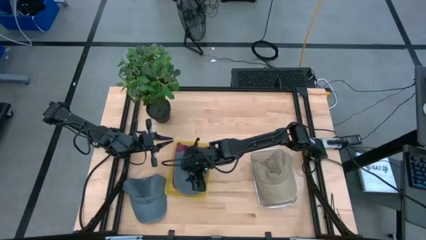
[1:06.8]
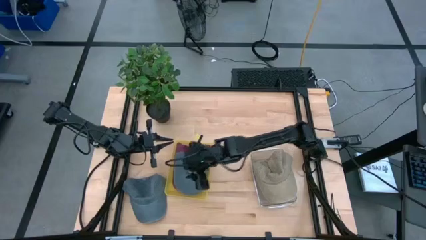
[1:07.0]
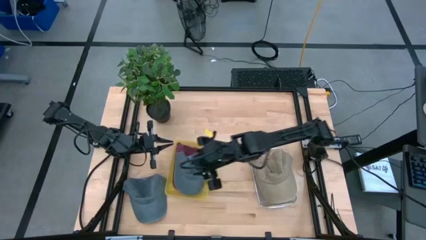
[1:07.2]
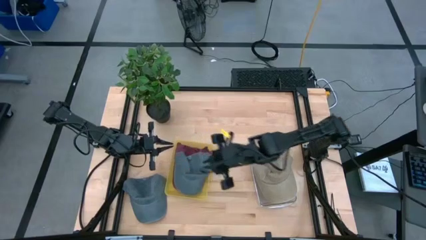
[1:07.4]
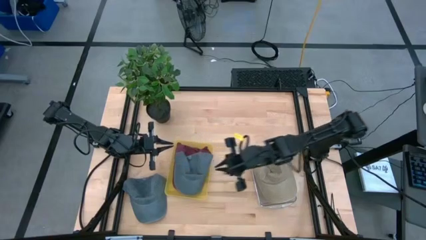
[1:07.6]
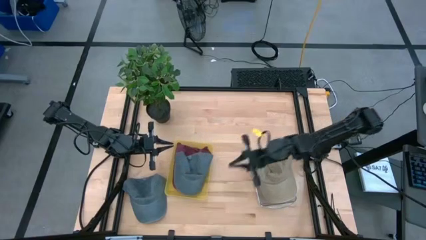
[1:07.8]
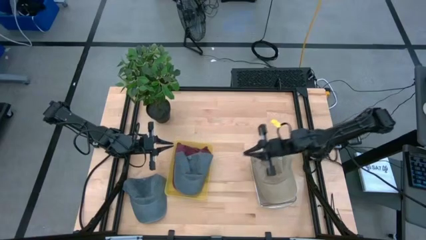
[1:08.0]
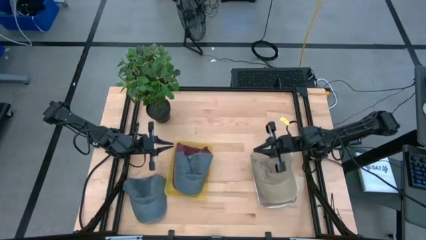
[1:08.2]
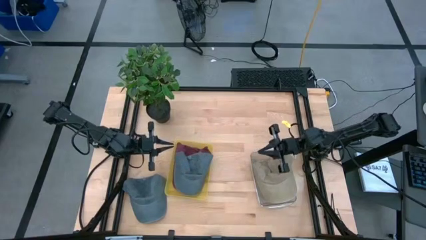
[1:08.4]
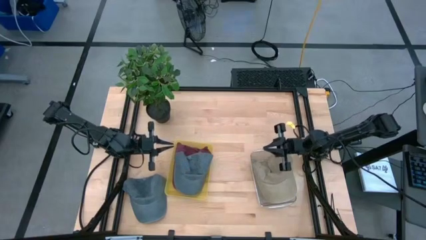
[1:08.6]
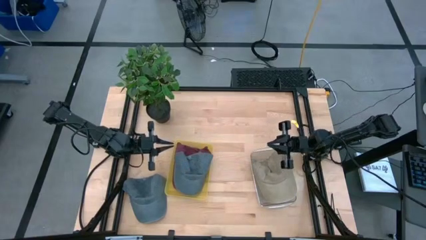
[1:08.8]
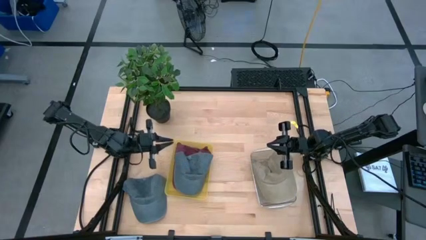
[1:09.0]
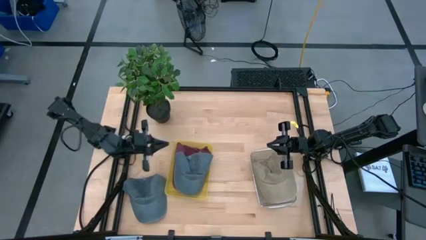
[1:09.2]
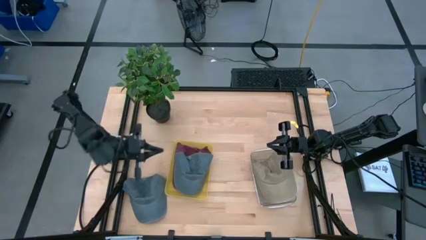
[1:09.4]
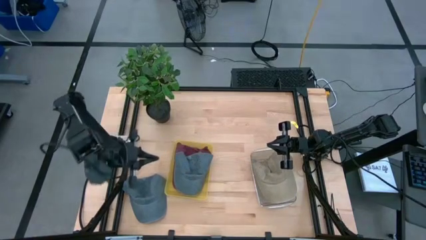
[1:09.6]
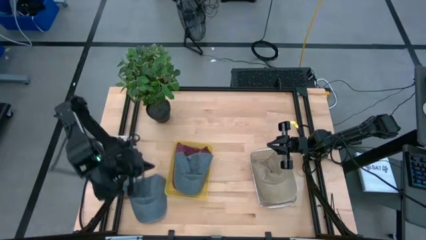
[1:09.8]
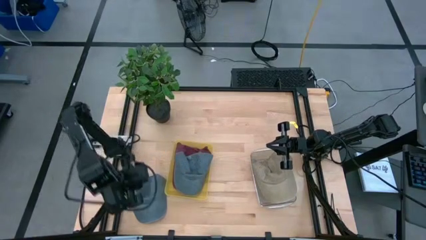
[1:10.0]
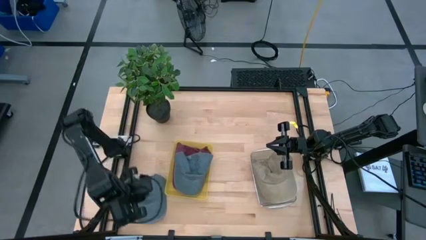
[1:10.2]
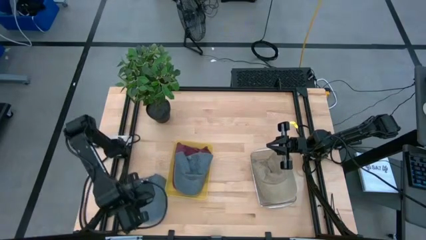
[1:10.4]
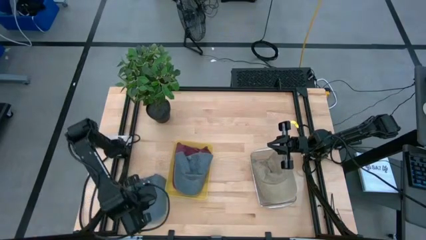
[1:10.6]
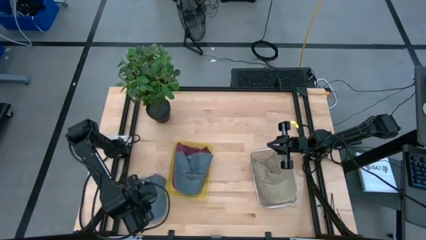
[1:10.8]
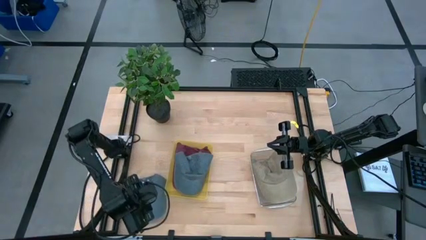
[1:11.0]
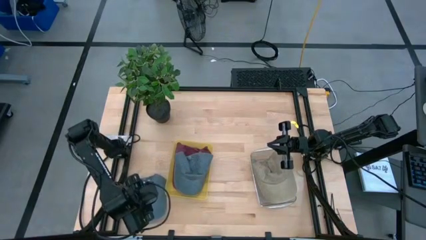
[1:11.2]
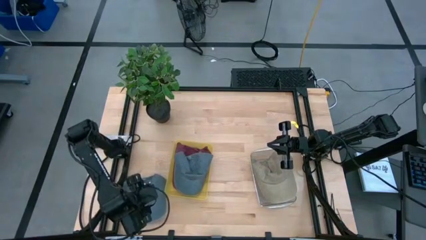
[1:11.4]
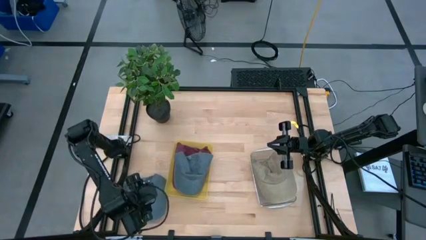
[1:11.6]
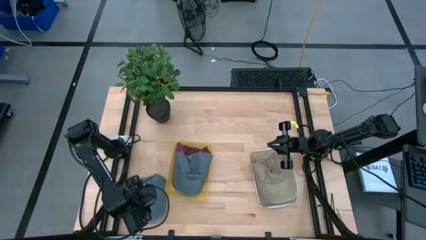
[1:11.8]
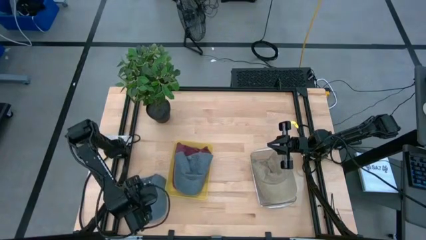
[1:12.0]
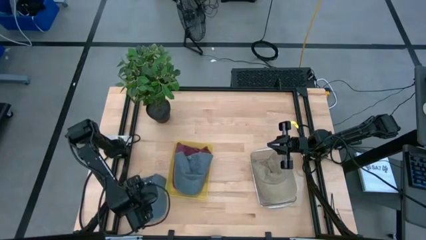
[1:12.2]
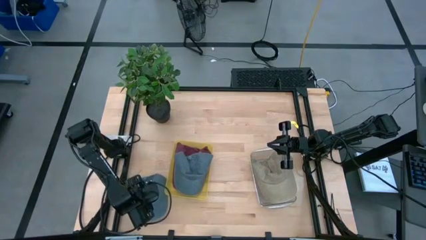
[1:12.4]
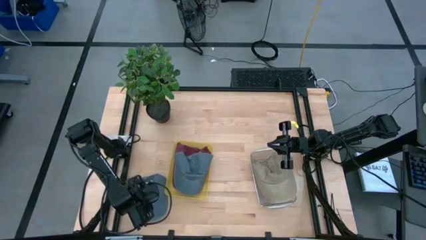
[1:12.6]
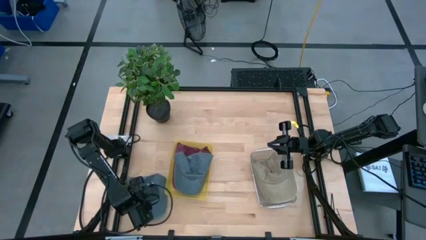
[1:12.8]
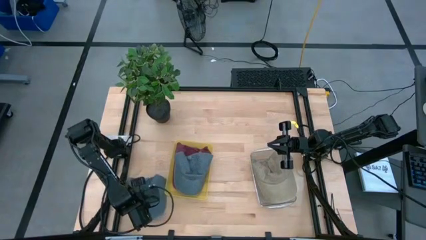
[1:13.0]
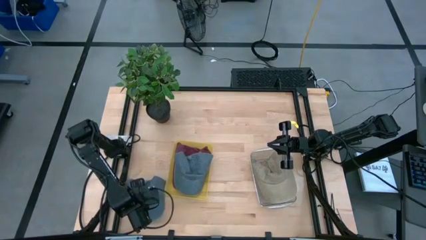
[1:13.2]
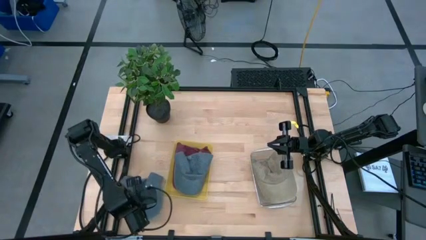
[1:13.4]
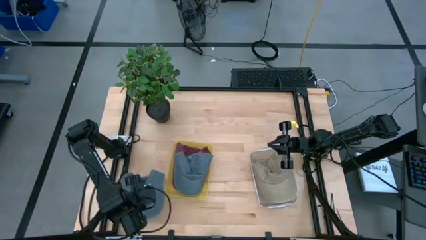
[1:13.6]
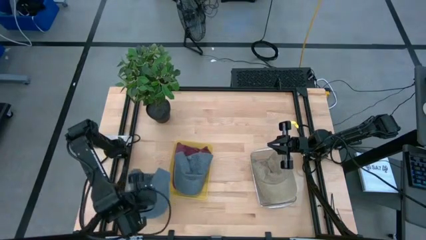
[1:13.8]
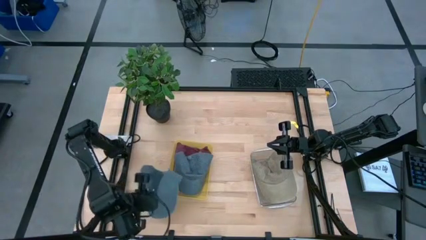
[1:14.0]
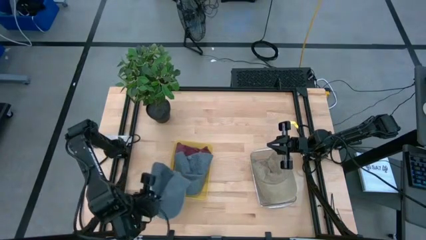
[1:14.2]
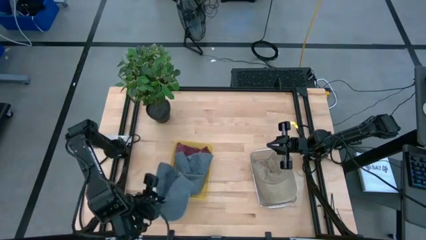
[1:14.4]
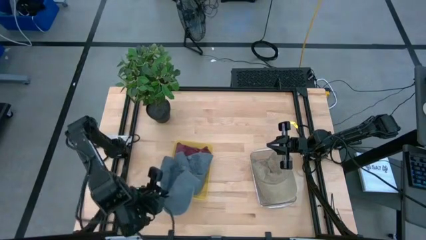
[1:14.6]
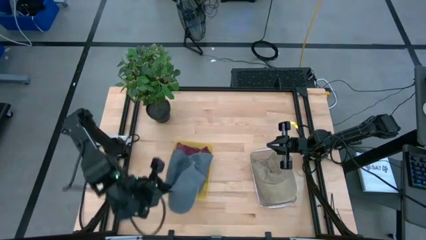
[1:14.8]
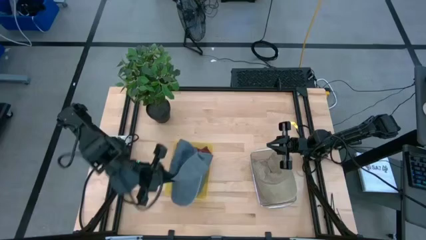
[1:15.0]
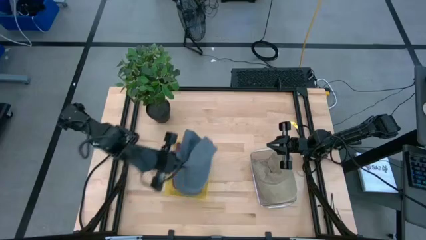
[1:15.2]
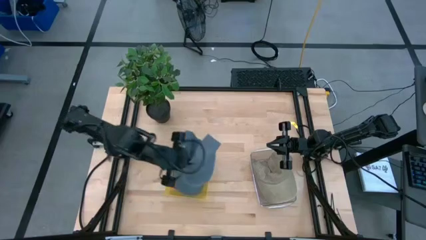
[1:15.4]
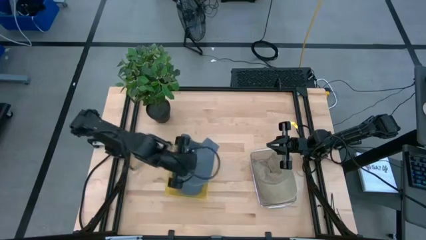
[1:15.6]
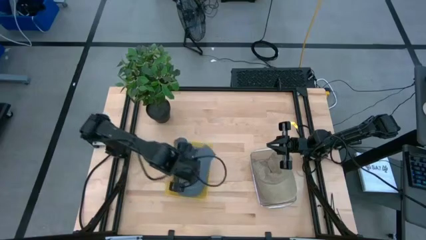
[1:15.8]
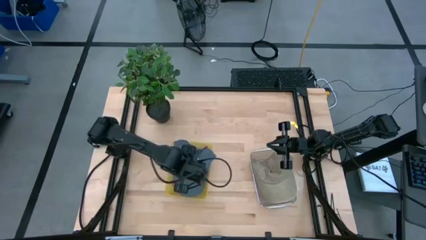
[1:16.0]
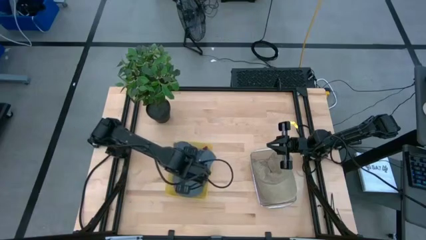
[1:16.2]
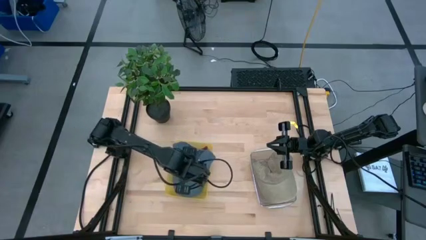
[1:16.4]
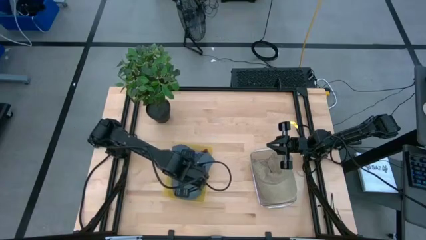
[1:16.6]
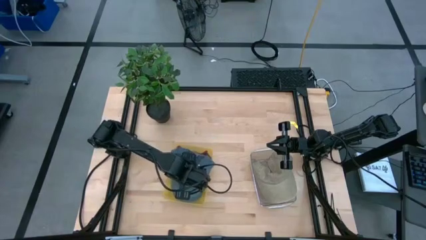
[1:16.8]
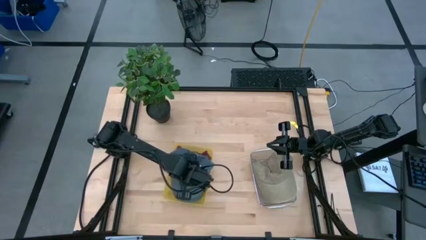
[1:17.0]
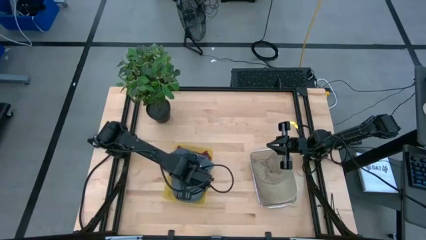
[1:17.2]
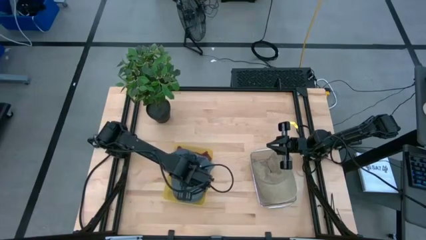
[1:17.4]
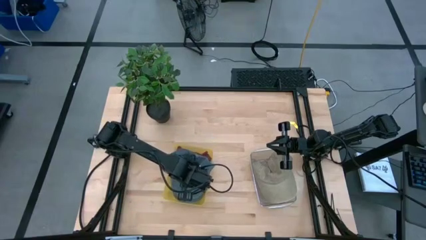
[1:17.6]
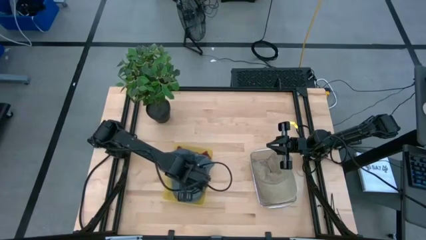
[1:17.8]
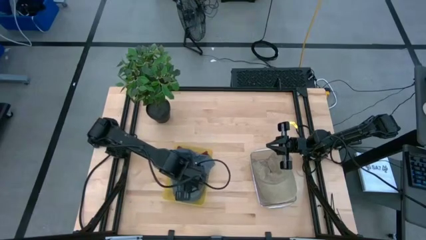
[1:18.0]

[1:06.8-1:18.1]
Task: Pick & Place hat
Put the blue cap into the yellow bin
